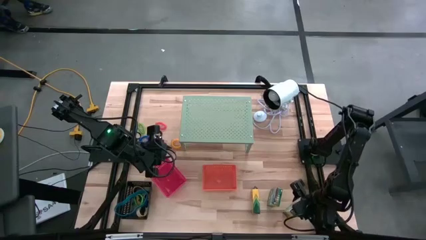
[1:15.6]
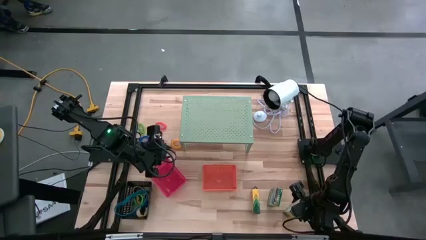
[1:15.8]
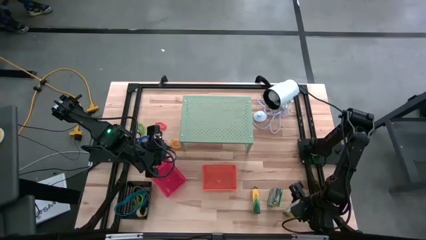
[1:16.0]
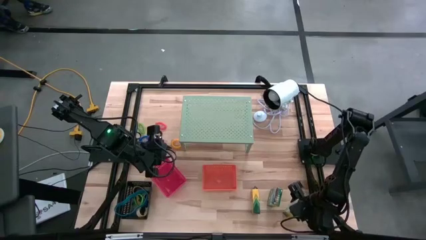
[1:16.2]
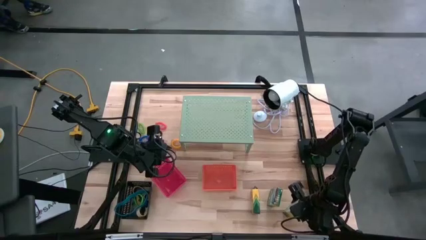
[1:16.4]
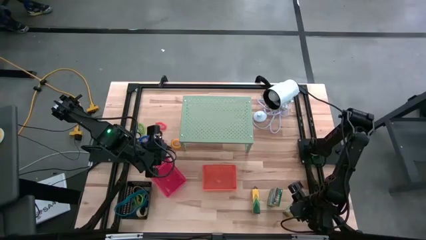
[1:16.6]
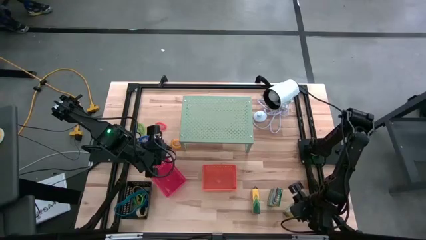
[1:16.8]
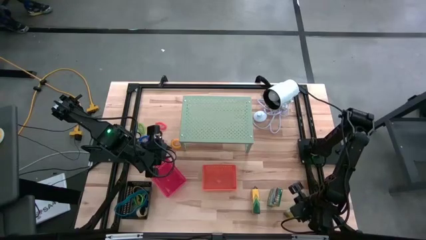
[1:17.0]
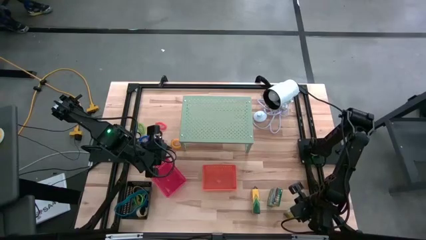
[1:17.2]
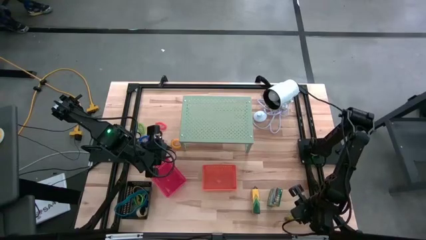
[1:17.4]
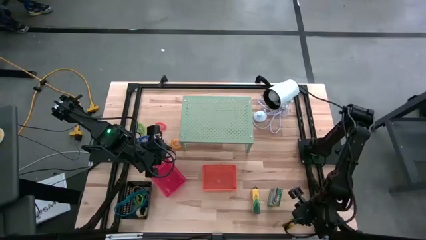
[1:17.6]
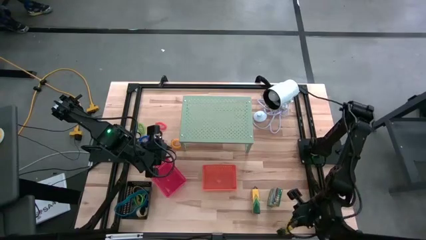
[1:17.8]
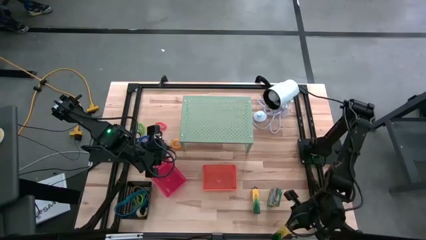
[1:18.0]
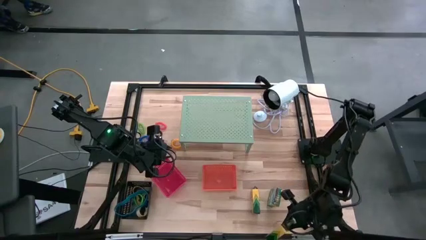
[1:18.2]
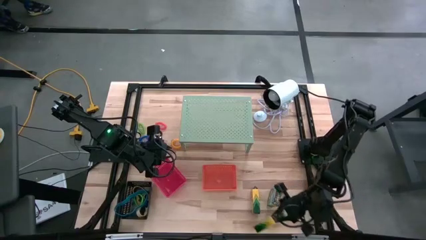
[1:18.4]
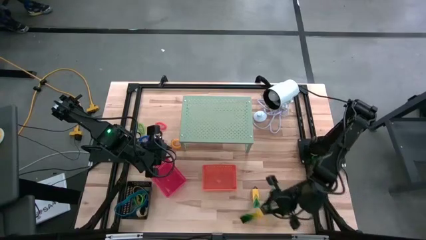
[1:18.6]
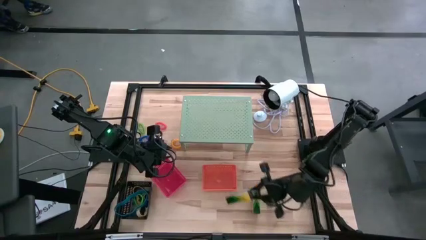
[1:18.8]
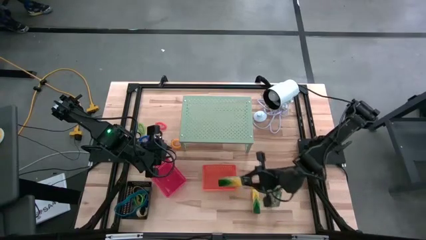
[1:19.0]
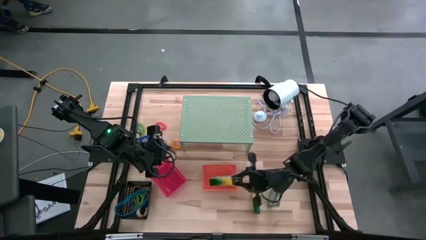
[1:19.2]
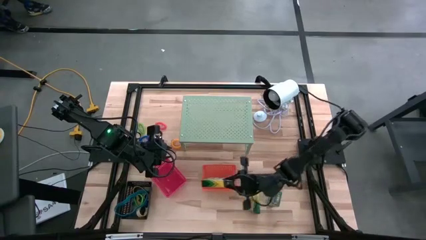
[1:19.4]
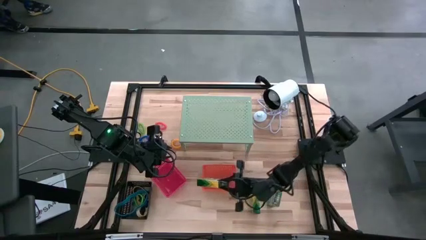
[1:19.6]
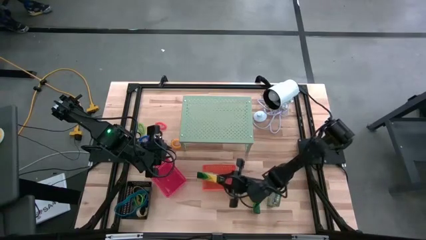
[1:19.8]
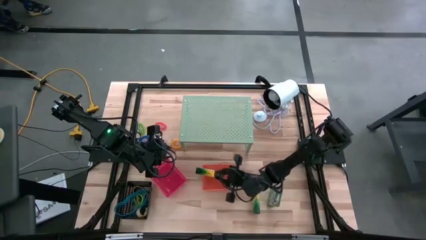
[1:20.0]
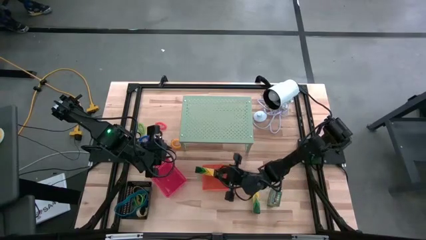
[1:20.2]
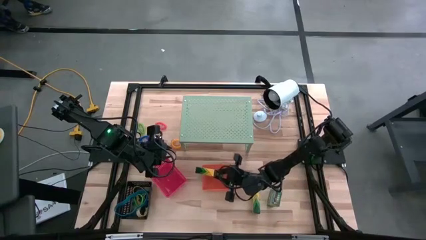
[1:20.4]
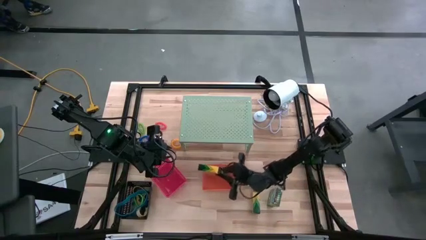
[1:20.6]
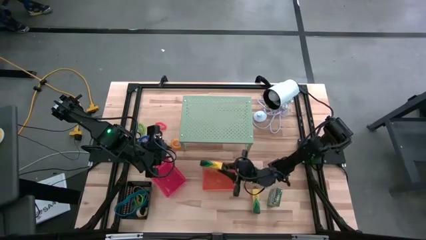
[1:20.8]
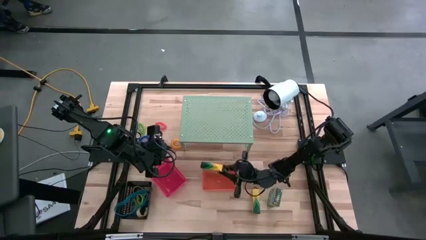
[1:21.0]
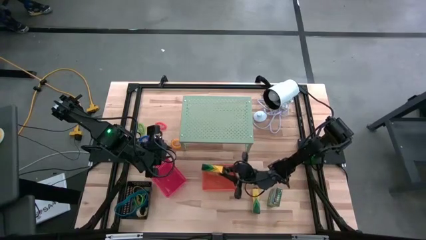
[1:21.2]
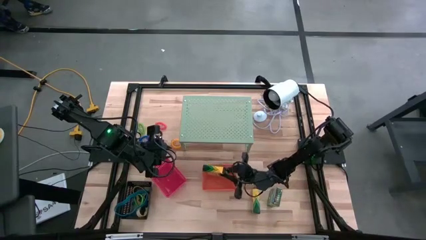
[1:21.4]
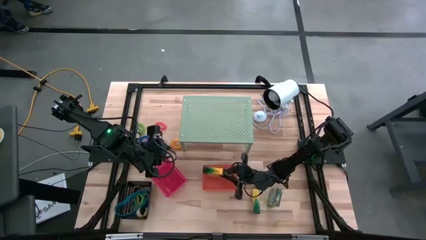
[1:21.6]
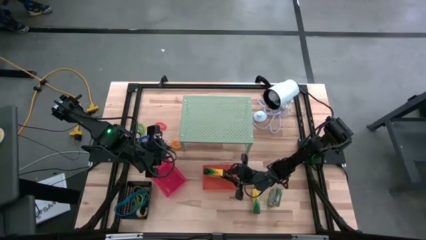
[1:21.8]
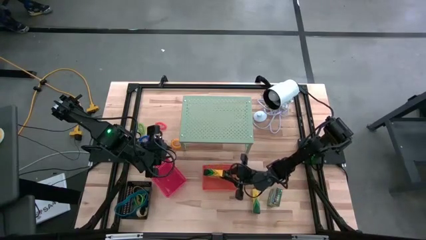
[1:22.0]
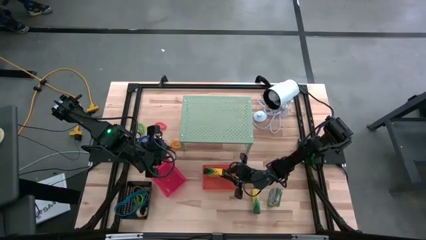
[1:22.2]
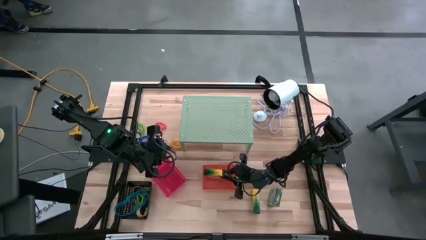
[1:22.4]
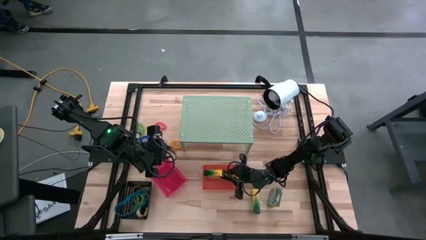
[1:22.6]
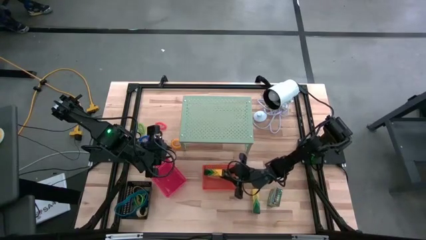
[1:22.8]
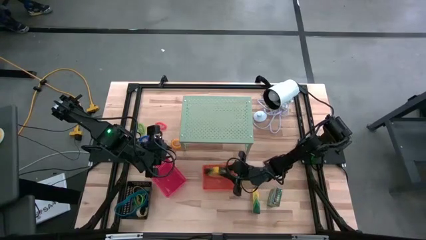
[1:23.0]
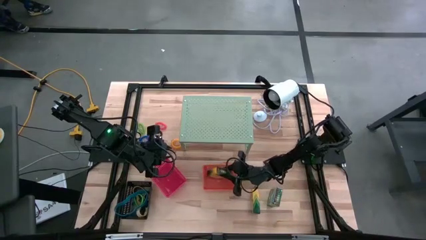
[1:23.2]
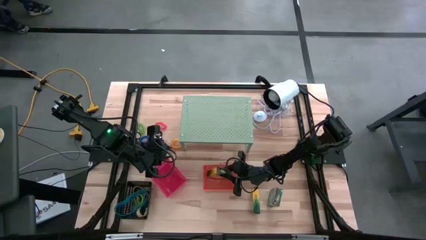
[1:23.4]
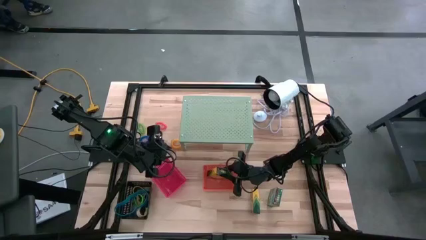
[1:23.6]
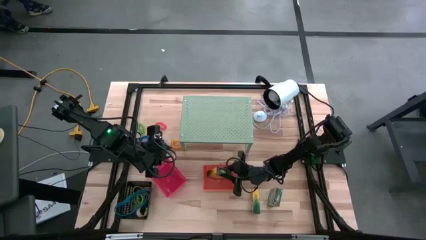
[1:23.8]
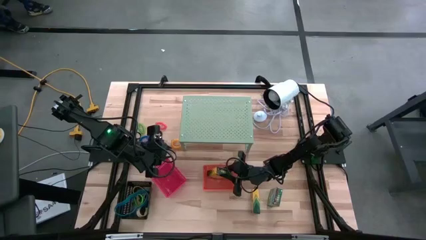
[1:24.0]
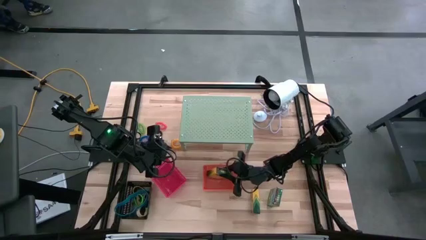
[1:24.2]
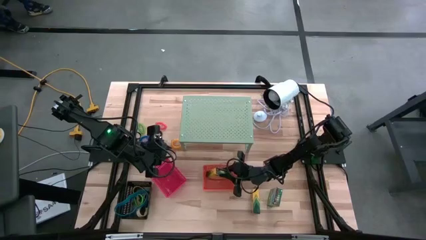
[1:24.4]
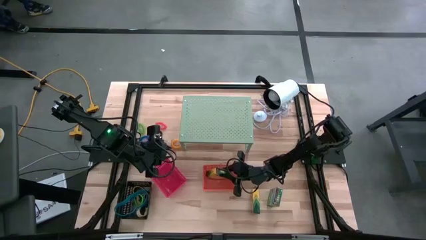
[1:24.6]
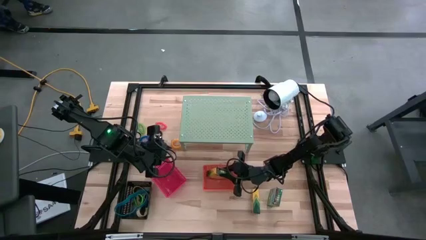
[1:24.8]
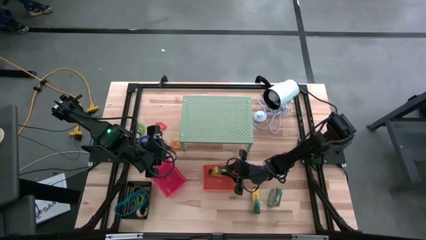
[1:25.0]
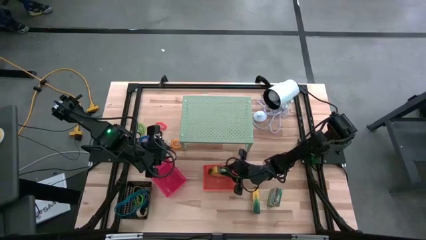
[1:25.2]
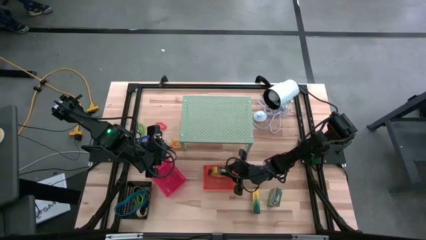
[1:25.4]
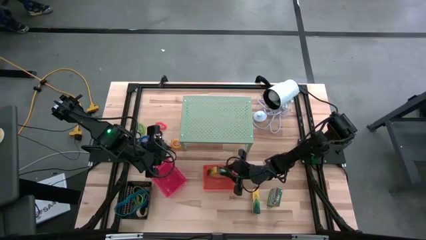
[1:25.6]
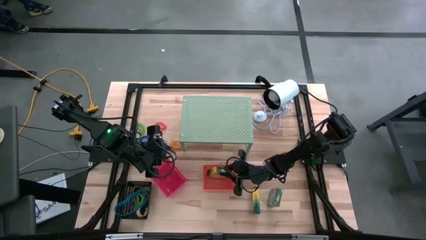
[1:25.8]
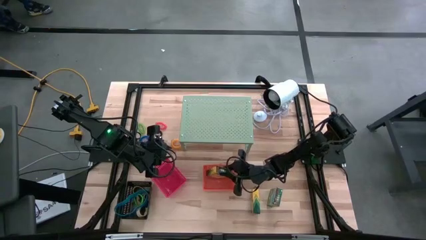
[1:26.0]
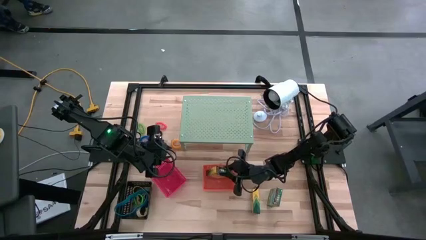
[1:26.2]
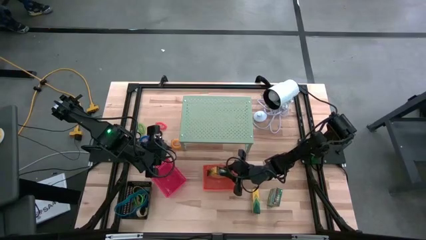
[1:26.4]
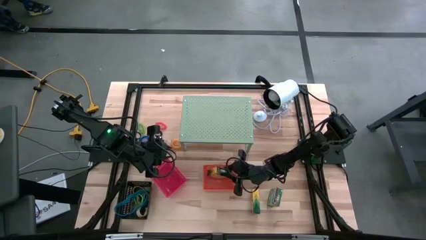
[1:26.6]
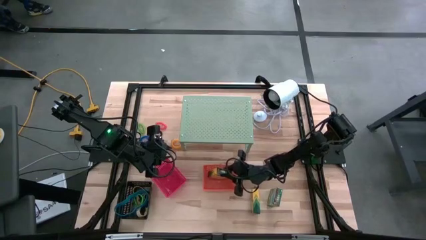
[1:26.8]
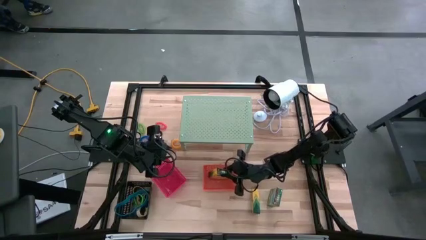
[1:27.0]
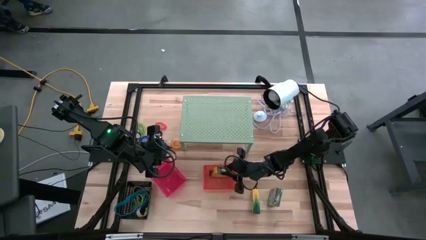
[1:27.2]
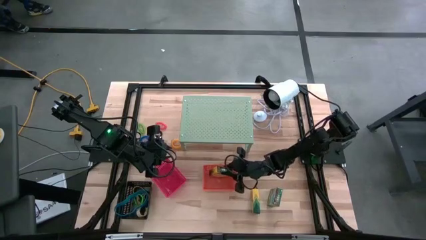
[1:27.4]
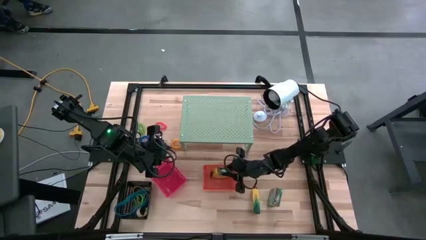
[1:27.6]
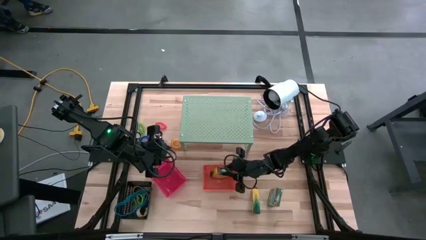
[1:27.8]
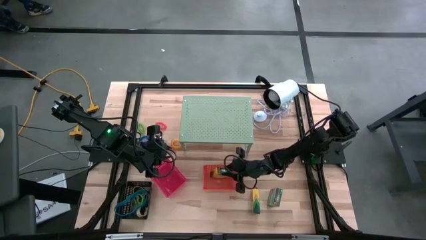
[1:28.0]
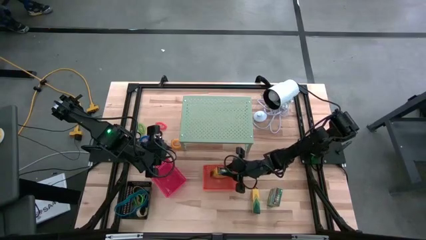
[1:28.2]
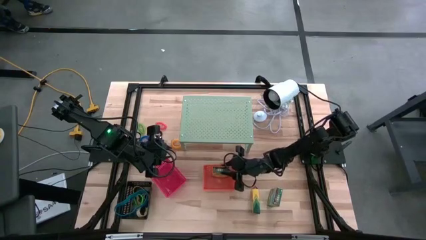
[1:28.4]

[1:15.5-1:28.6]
Task: Pick & Place Office Desk Supplies
Put the right crayon box into the orange bin

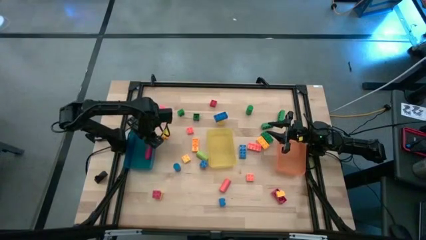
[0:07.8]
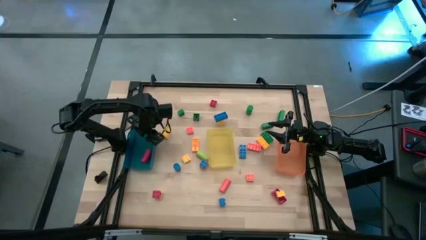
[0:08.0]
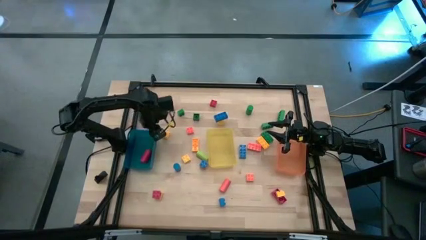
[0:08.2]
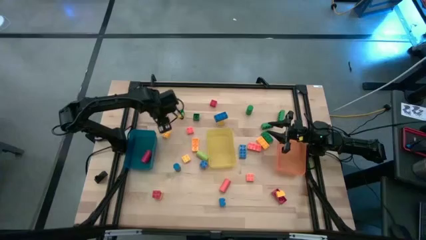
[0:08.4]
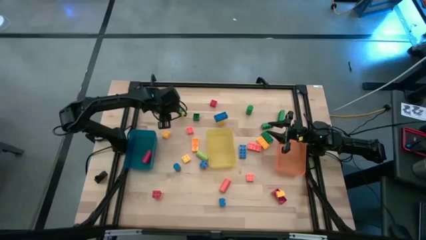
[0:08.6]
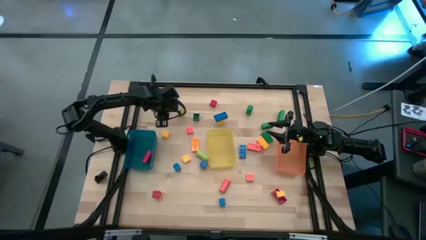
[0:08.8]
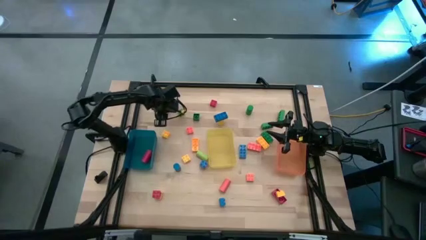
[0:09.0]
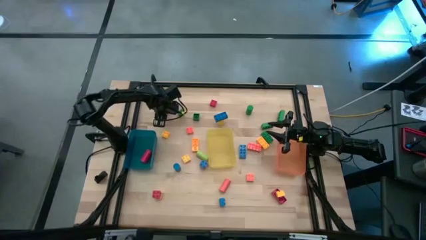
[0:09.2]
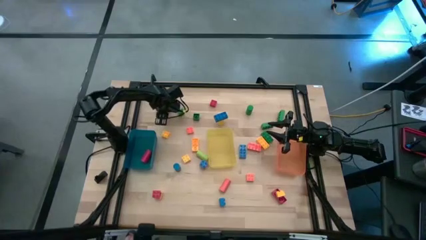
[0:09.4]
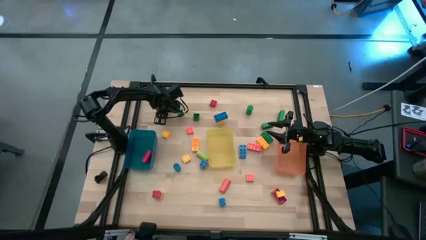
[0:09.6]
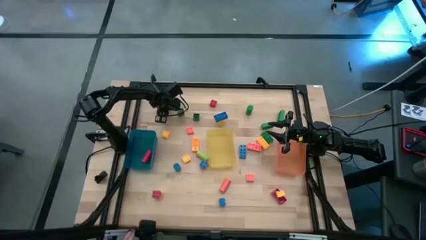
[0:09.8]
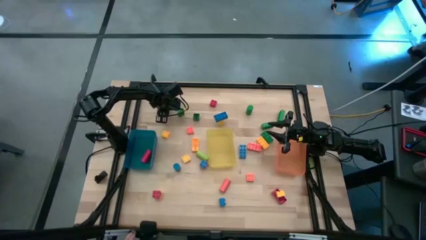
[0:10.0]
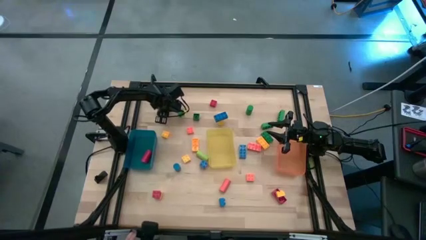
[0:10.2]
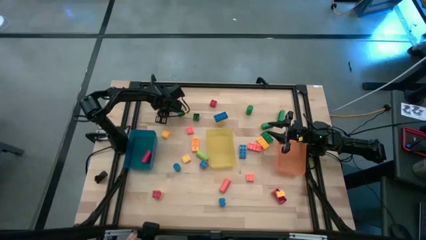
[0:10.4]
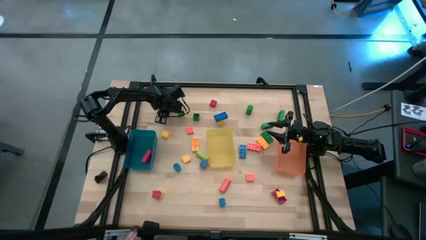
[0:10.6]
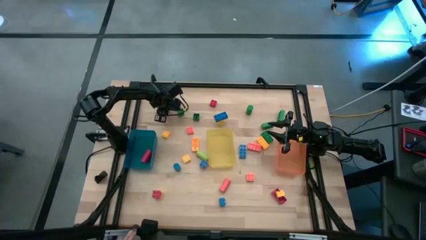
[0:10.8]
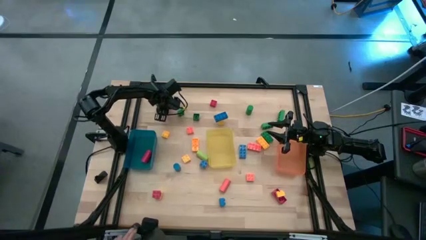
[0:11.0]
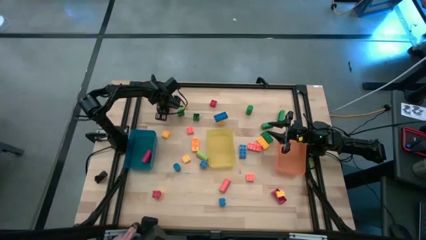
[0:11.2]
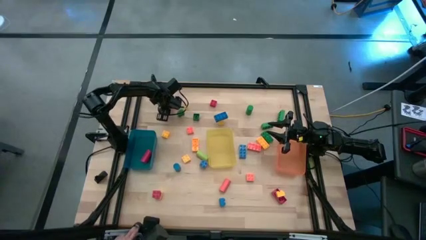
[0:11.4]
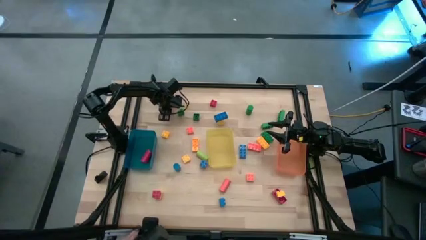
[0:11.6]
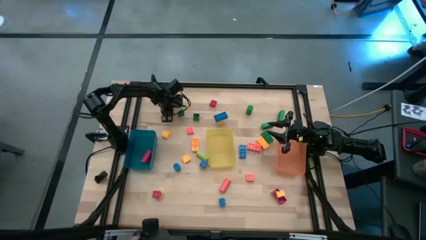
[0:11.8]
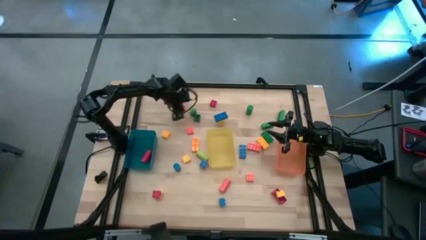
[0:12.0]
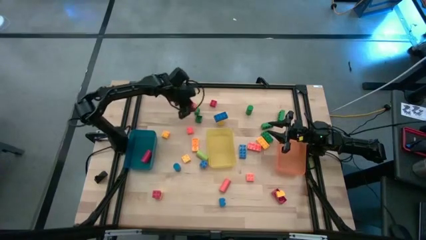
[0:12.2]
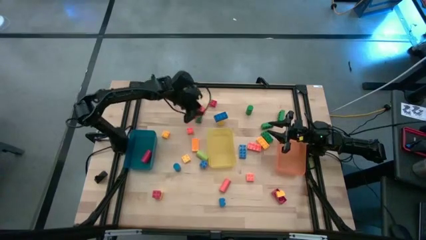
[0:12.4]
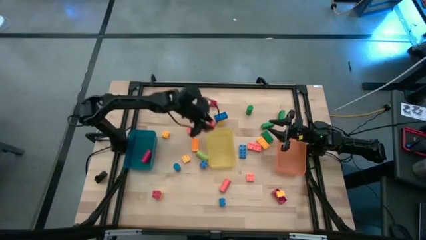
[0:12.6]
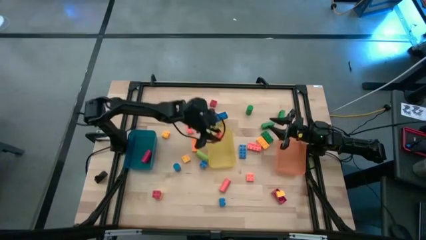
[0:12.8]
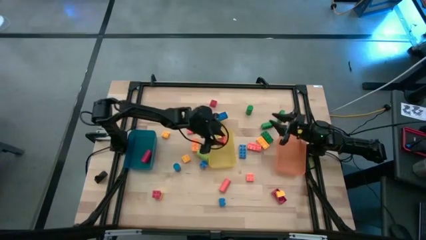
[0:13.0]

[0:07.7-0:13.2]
Task: Sort blocks by size
Put the orange 8 stud game piece into the yellow bin
